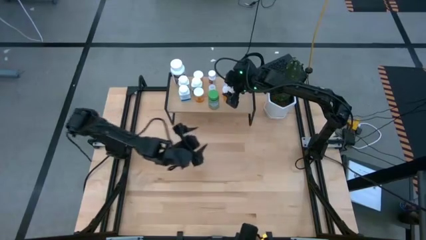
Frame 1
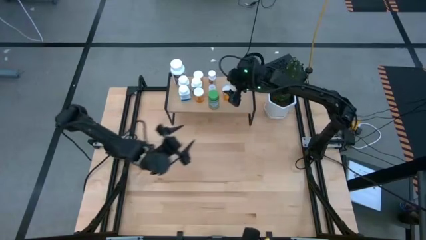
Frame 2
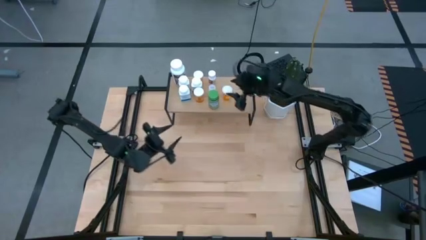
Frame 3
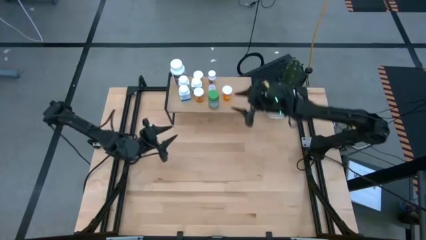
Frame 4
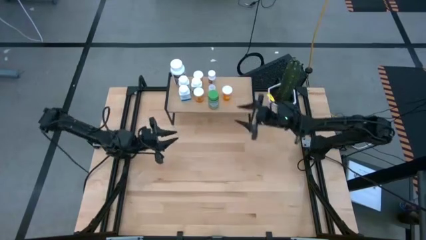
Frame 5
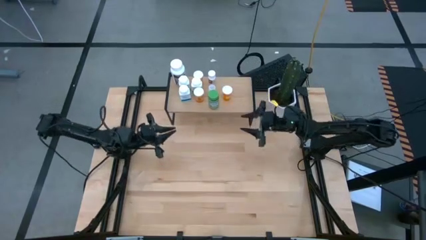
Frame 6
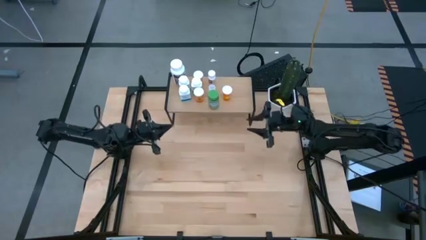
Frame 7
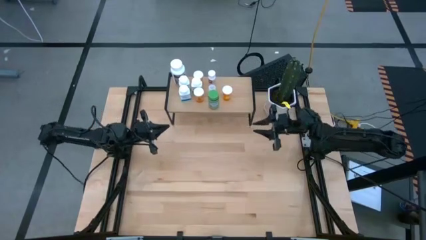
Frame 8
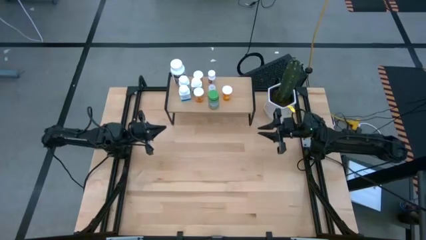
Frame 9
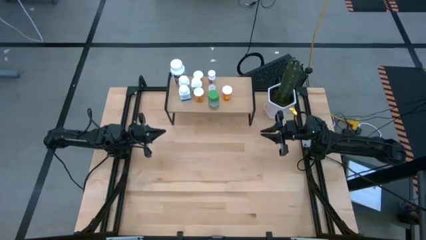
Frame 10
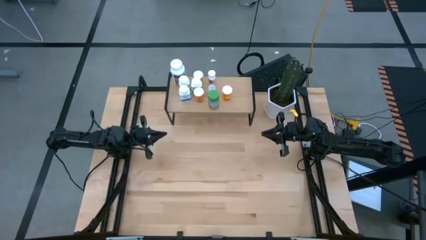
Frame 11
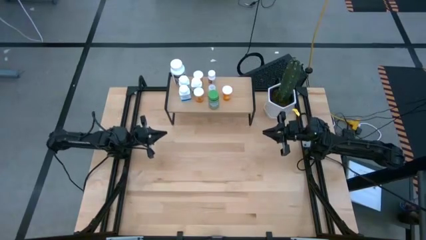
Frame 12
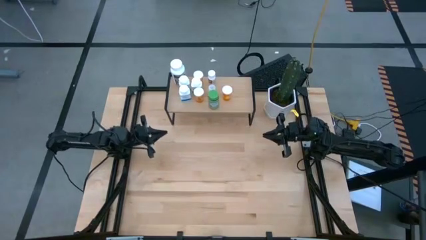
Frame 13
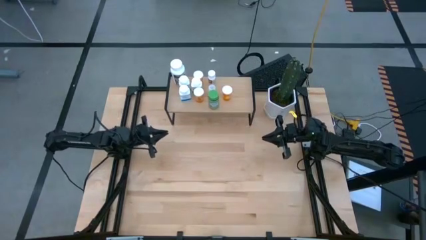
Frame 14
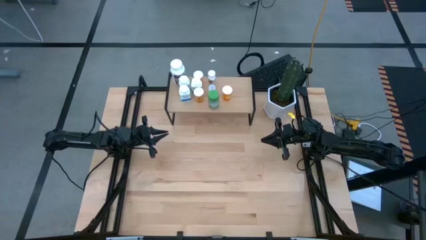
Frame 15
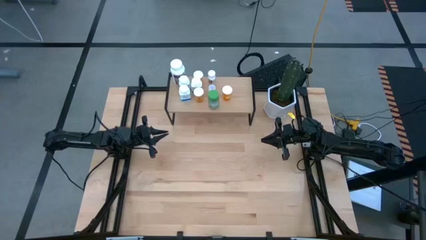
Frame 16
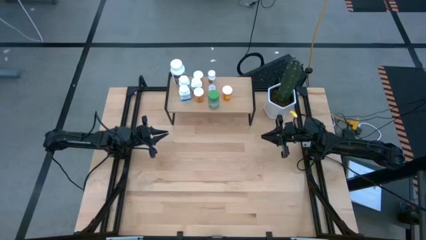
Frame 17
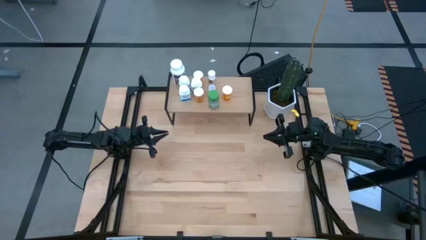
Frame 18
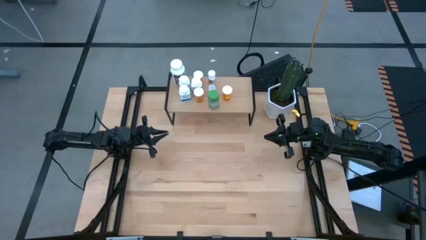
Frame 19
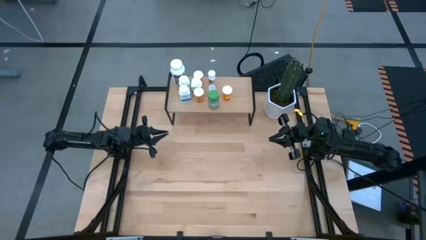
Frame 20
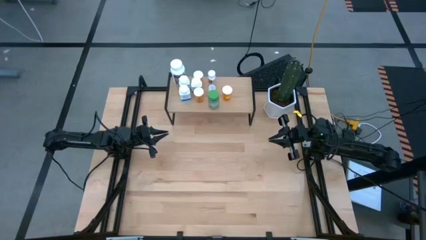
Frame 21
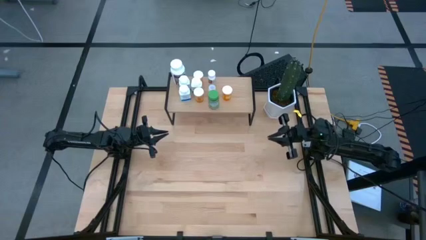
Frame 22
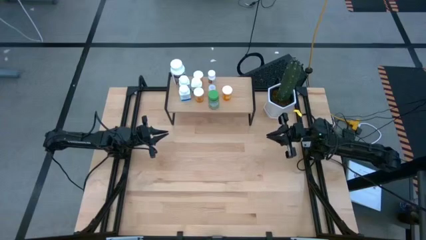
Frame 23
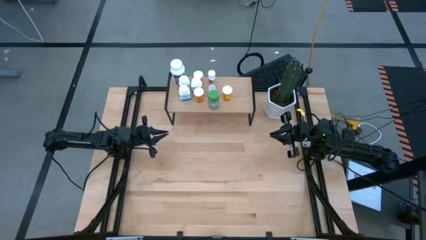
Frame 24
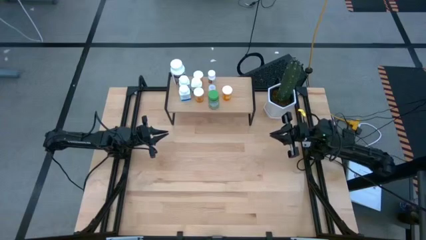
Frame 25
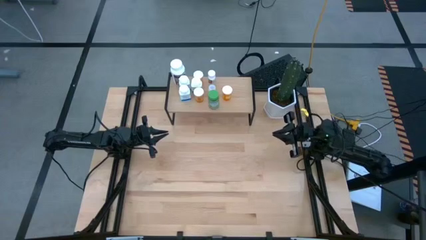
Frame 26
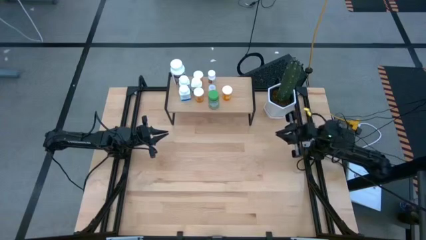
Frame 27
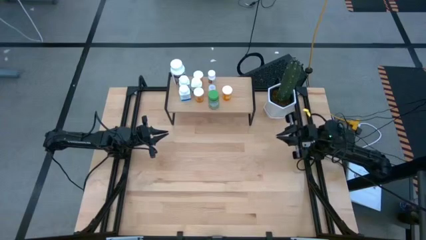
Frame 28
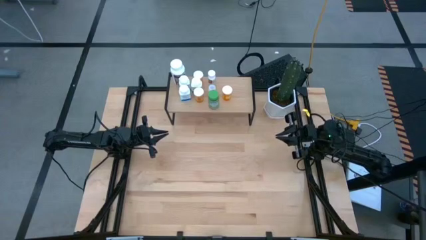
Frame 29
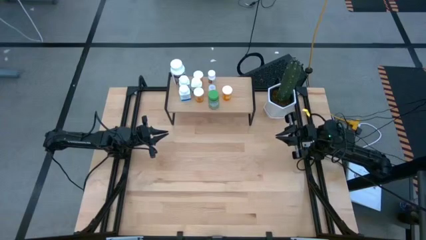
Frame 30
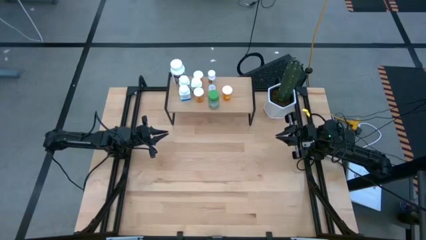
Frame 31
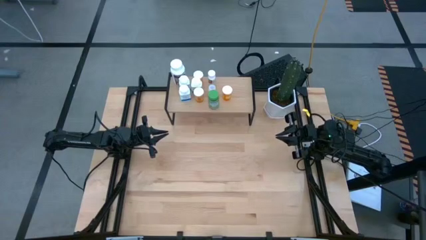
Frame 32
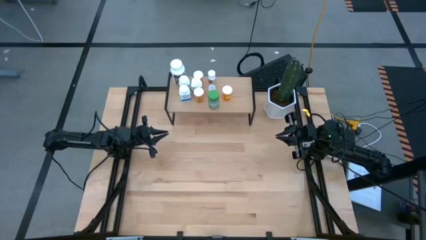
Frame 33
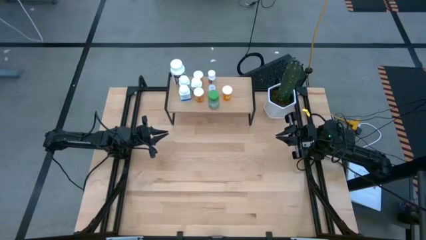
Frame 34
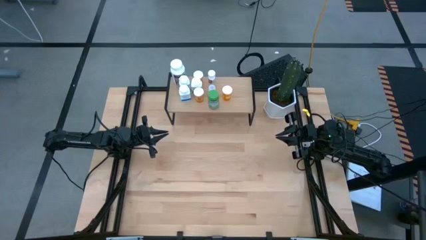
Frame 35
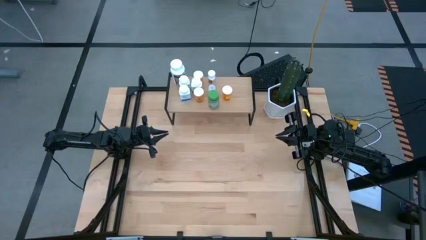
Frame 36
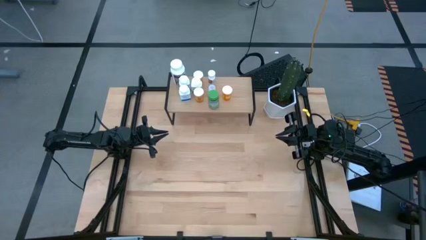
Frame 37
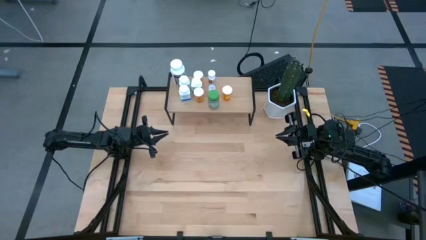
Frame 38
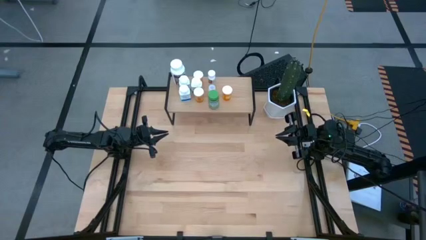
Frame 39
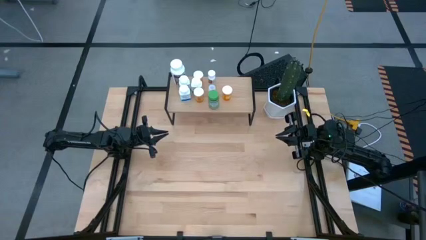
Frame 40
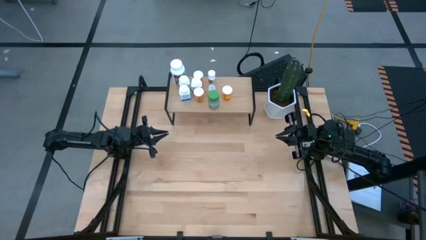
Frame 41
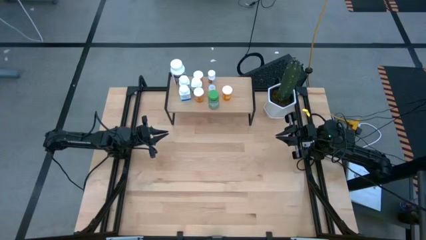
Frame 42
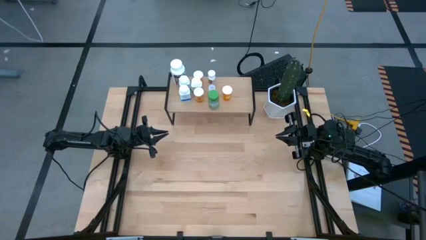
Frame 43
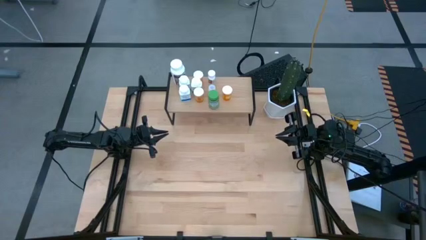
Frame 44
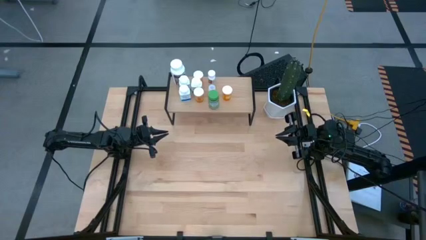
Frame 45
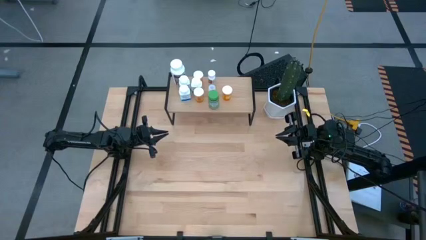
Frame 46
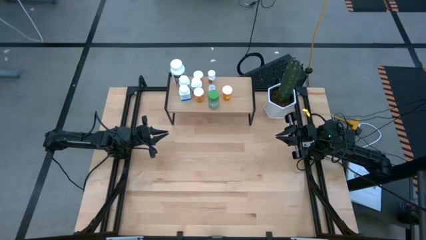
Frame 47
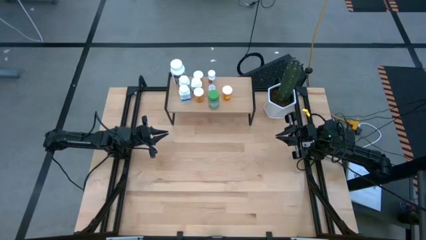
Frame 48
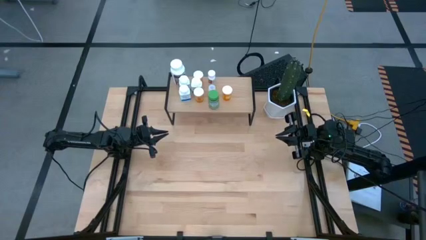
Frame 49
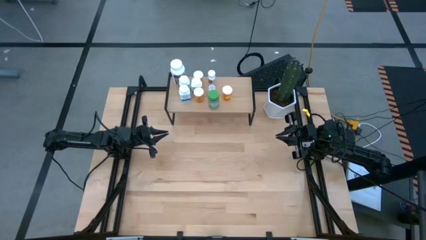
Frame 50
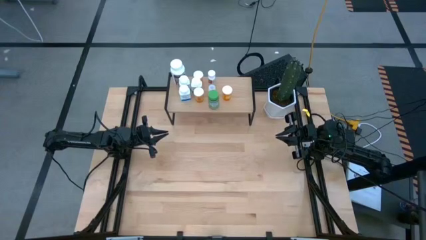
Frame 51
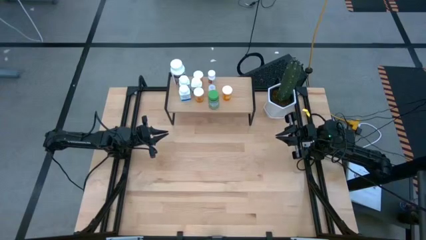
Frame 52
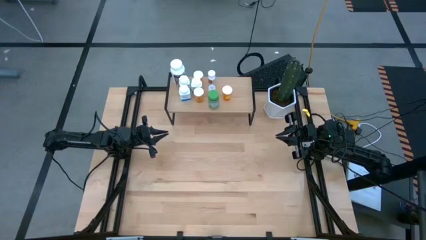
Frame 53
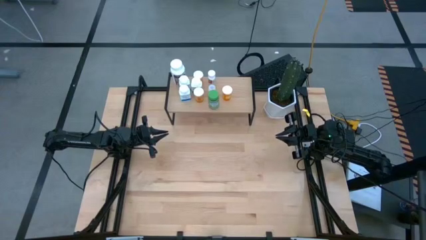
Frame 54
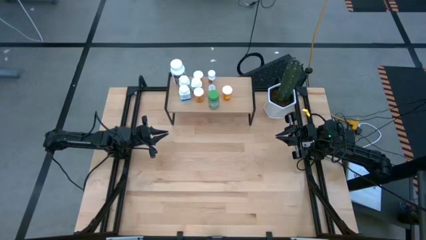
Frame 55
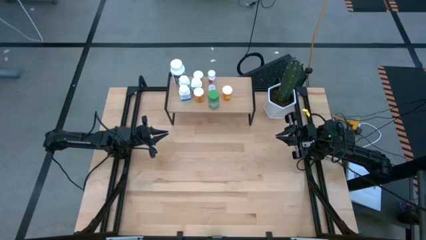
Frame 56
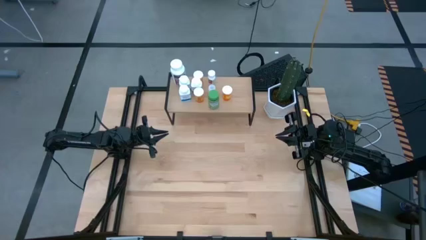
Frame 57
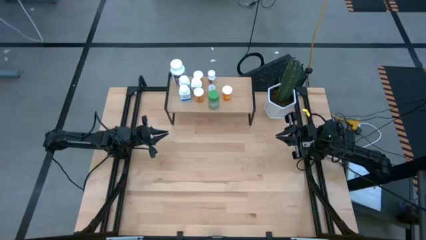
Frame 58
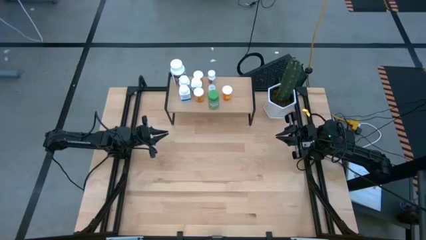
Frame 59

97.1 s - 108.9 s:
Task: Pick and place medicine bottles onto shelf by color
Return to Home Position

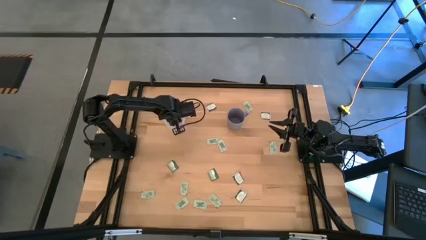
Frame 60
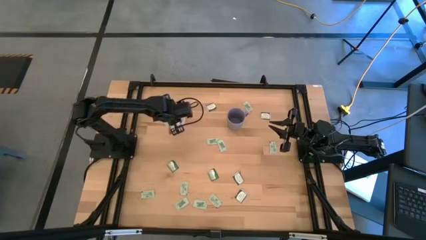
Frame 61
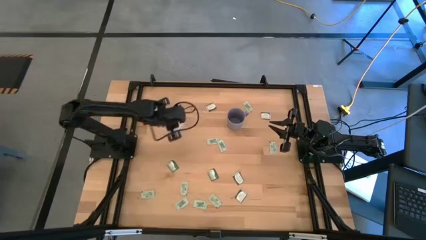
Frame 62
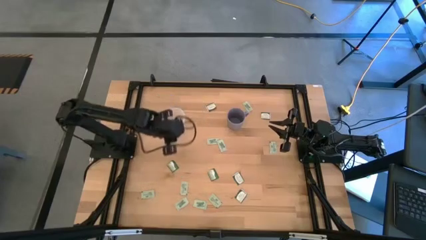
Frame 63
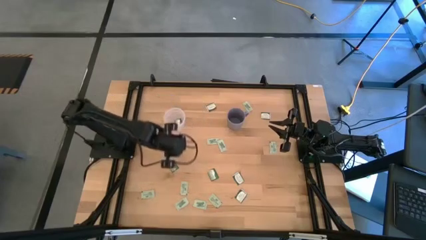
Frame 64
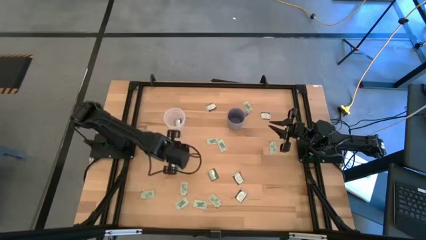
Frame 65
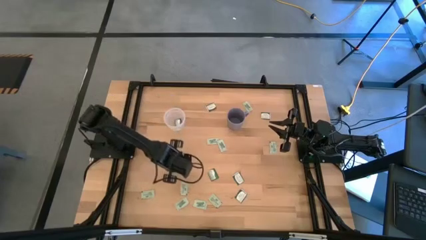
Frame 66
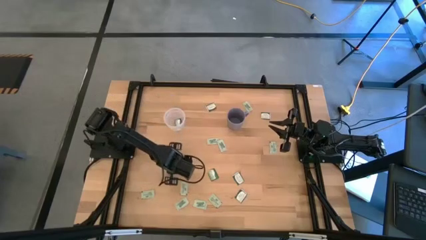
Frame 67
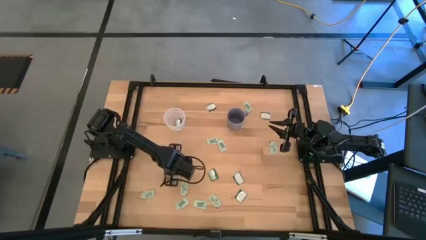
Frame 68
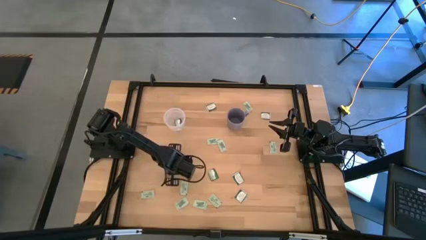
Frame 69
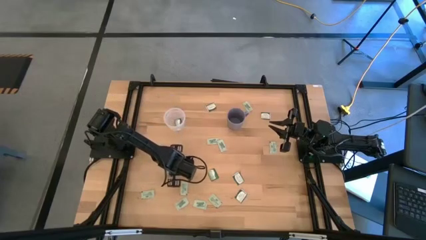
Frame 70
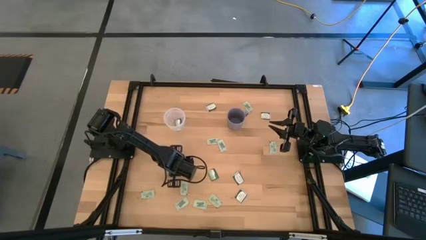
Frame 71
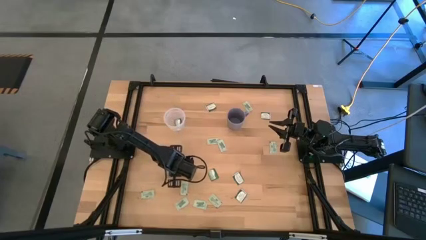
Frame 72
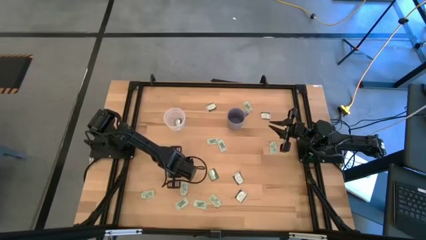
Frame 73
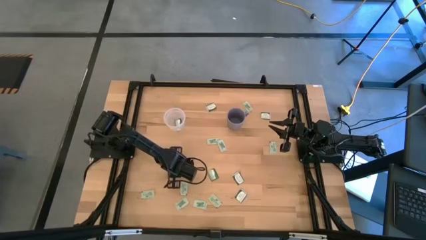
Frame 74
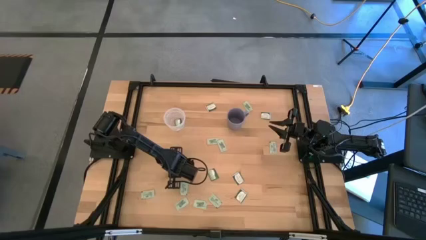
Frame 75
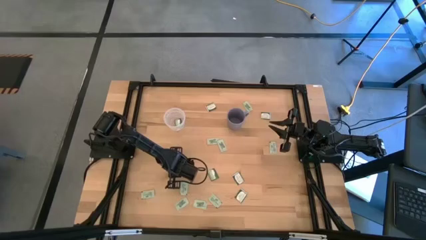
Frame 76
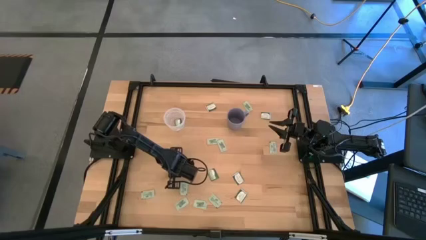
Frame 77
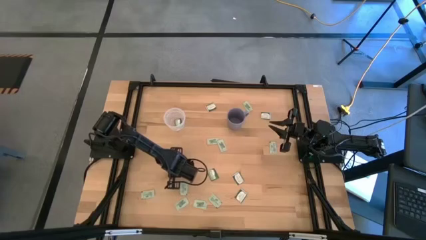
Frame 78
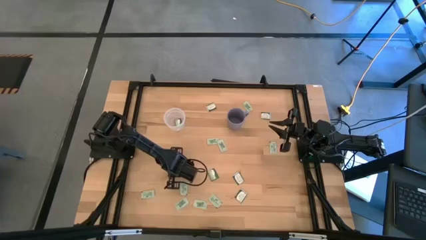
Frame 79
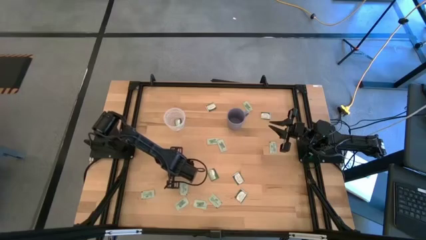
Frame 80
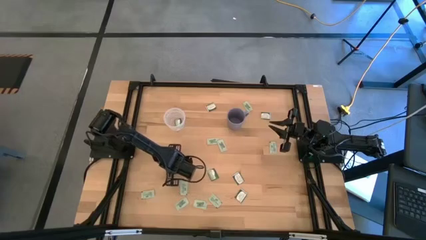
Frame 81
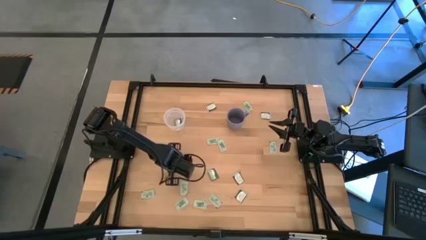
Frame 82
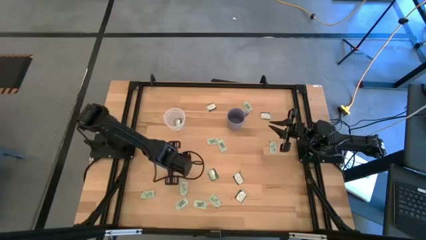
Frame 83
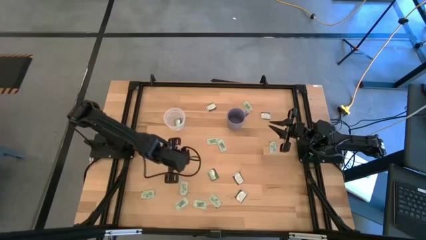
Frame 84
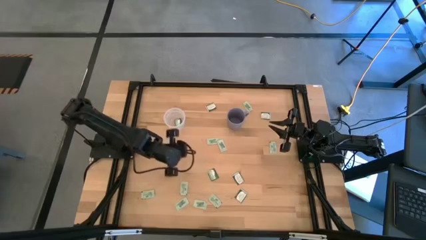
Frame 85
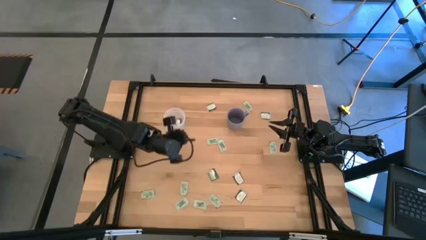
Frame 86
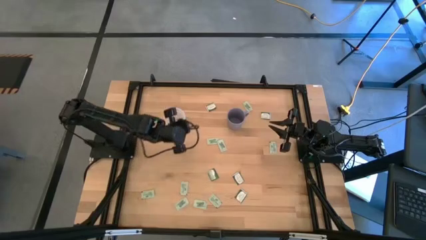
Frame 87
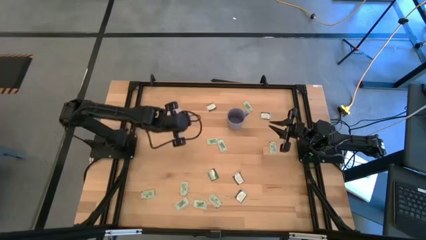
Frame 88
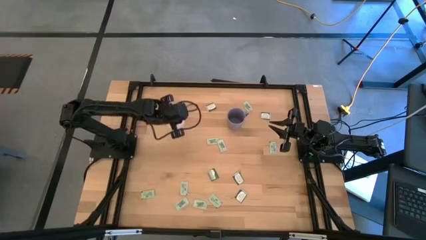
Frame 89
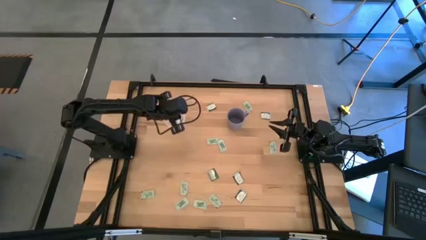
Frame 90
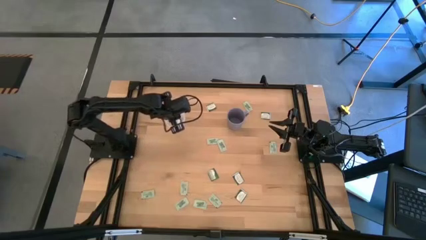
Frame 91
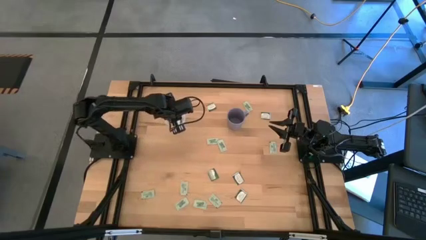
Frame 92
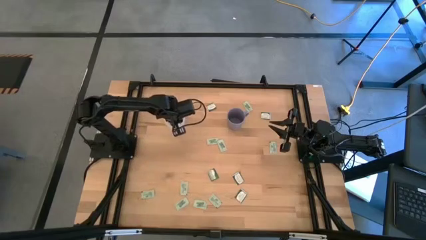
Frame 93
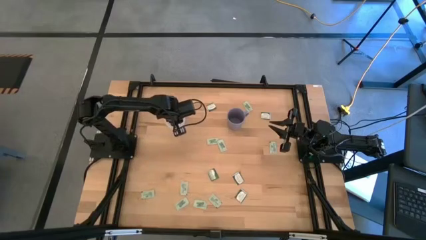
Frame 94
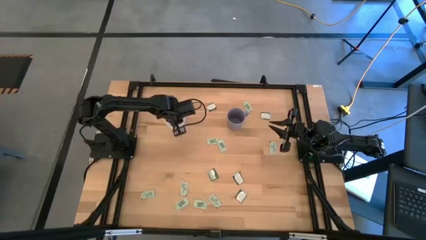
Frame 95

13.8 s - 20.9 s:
Task: Pick and place Stevia / Truvia into bins
Put the green stevia packet into the transparent container
